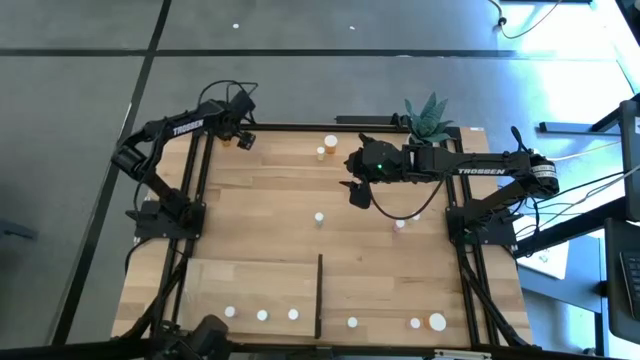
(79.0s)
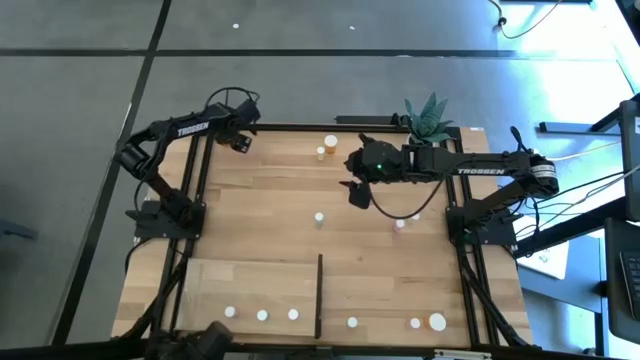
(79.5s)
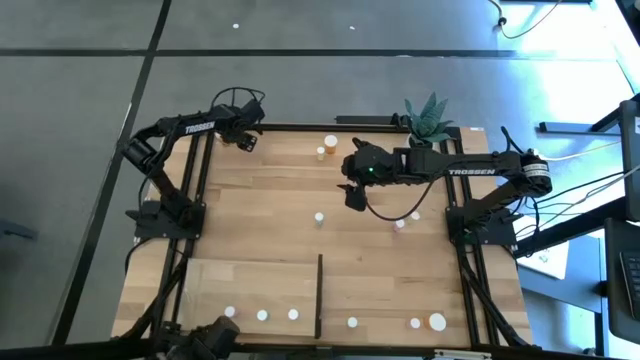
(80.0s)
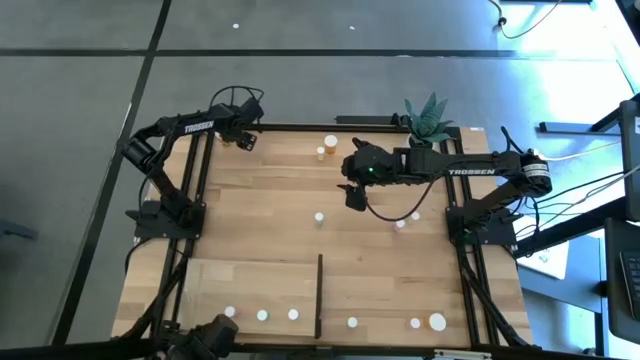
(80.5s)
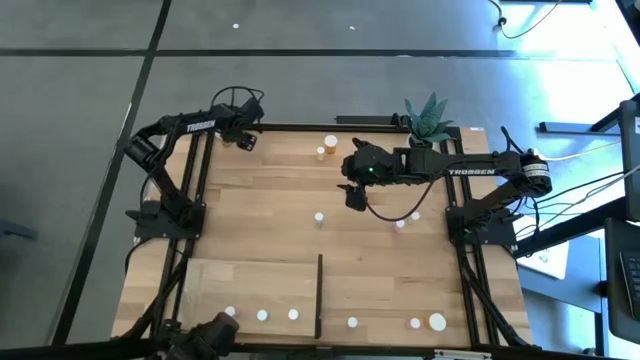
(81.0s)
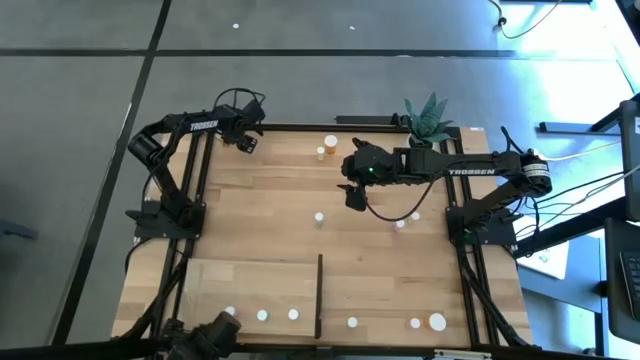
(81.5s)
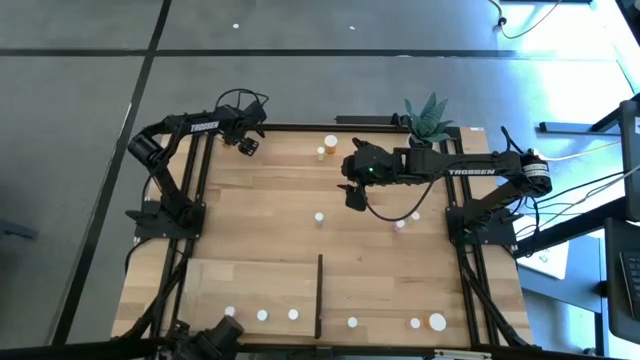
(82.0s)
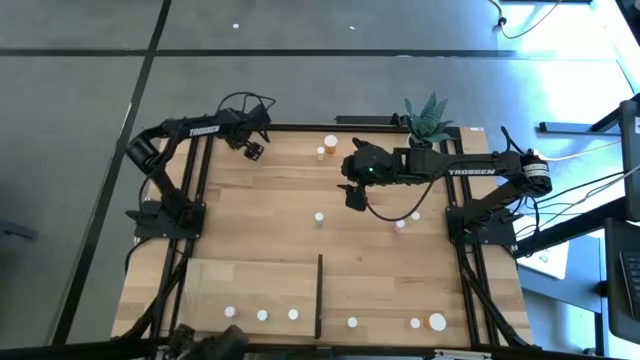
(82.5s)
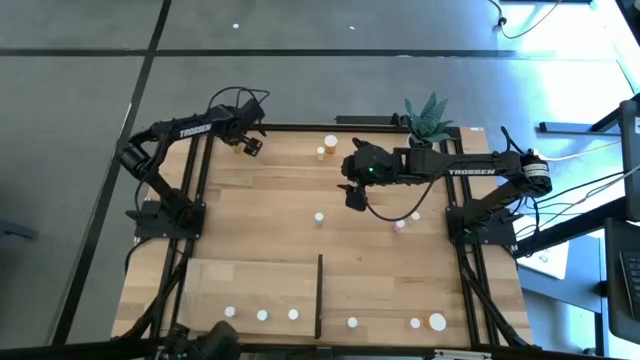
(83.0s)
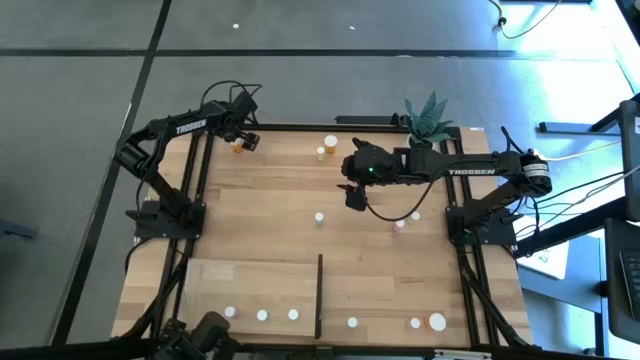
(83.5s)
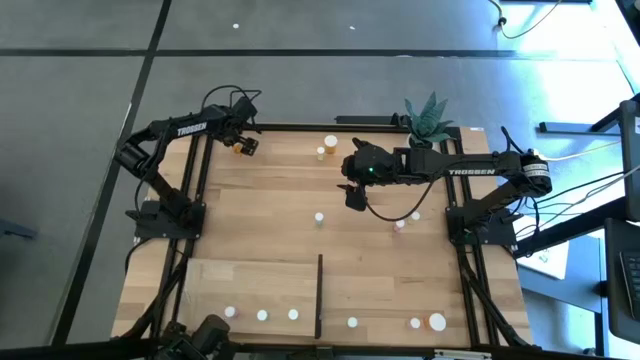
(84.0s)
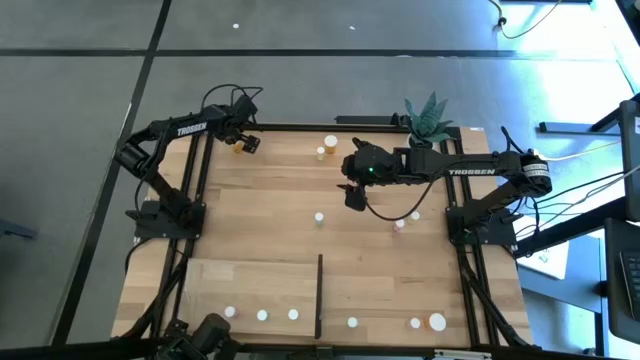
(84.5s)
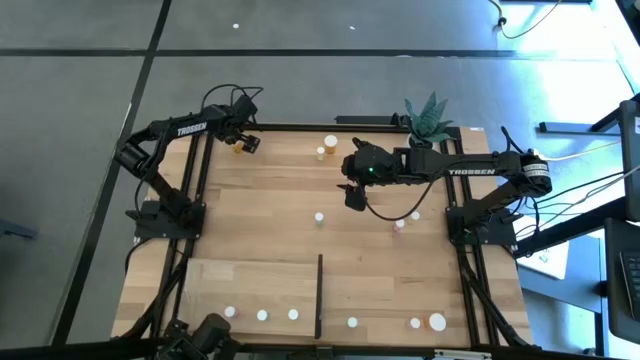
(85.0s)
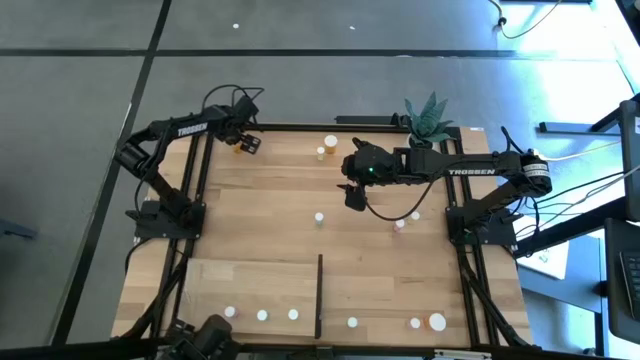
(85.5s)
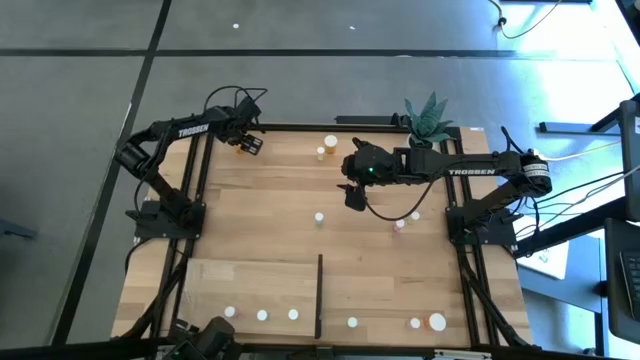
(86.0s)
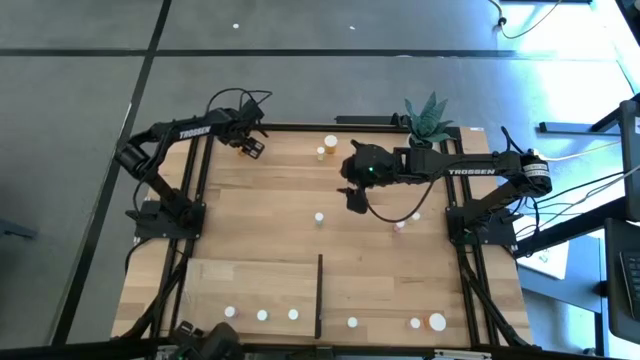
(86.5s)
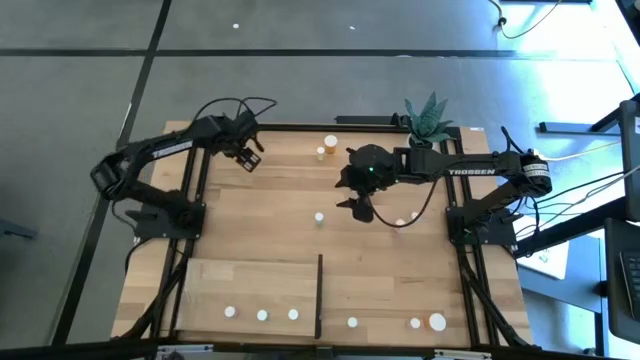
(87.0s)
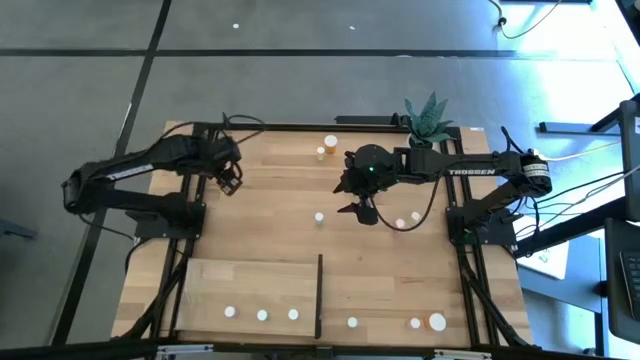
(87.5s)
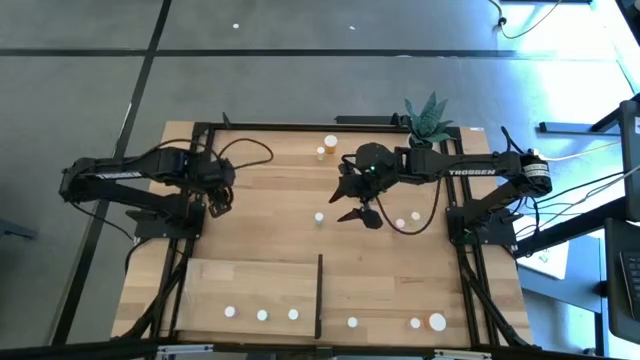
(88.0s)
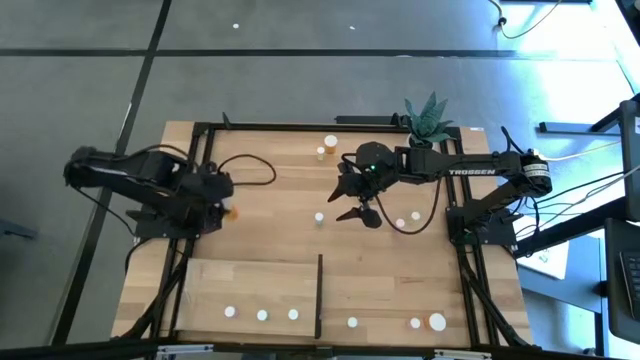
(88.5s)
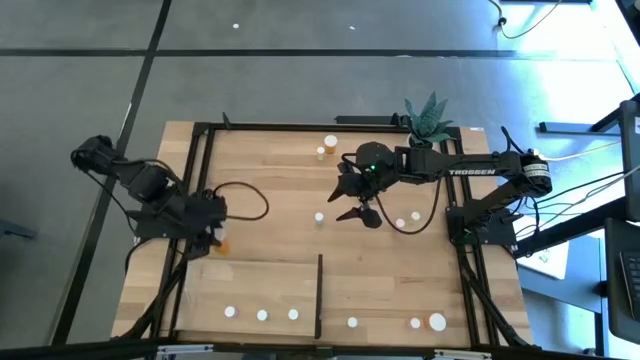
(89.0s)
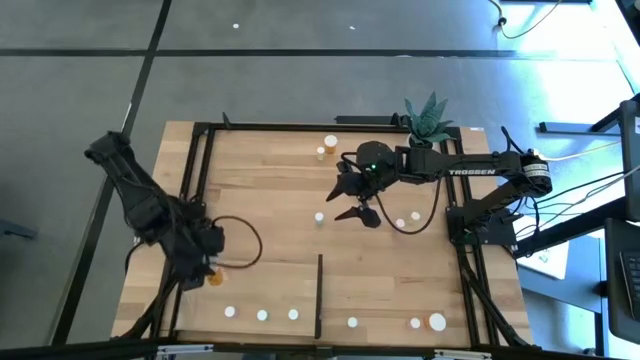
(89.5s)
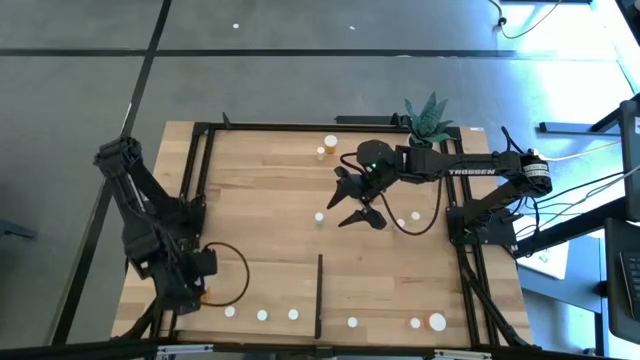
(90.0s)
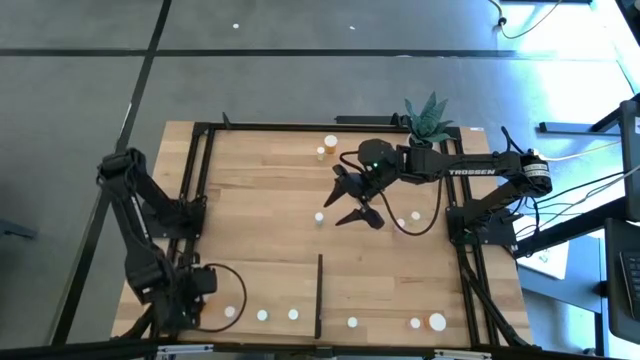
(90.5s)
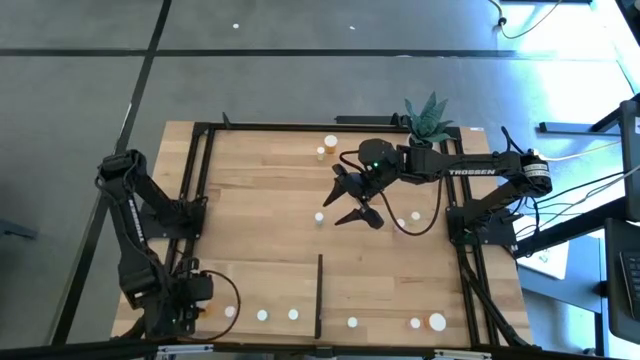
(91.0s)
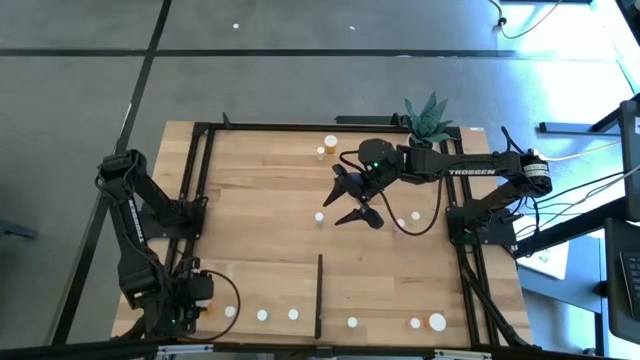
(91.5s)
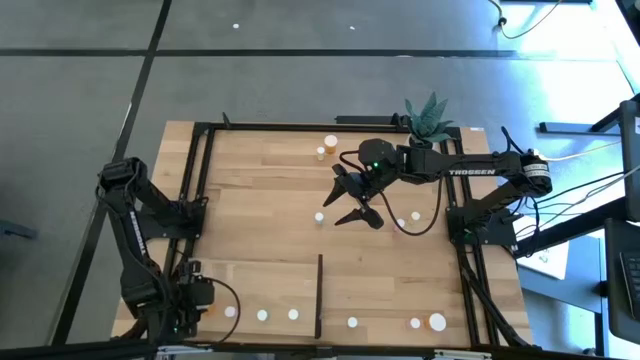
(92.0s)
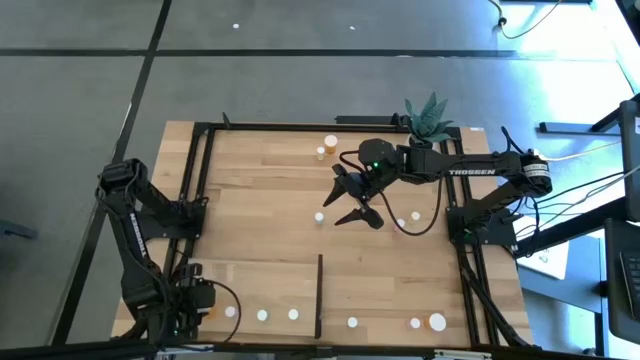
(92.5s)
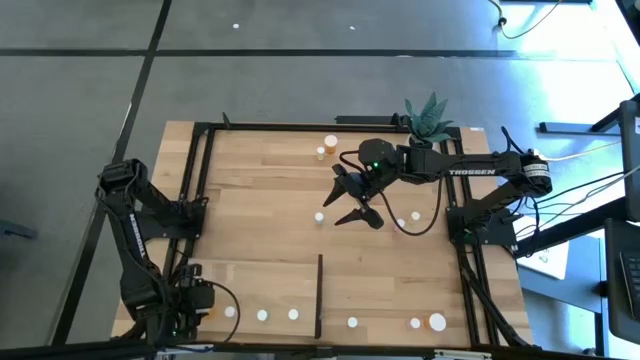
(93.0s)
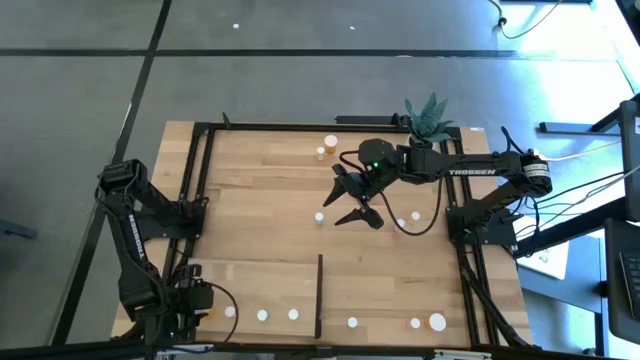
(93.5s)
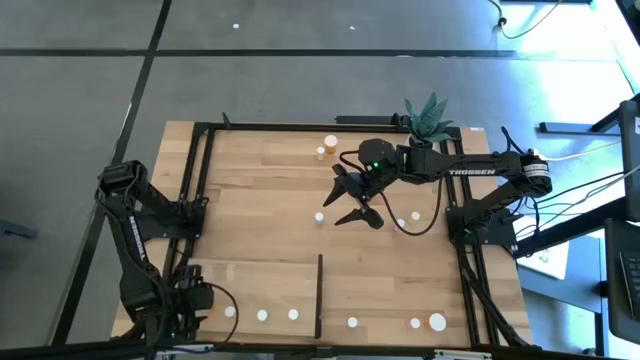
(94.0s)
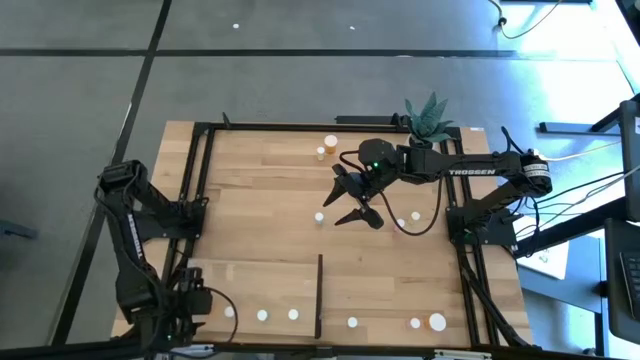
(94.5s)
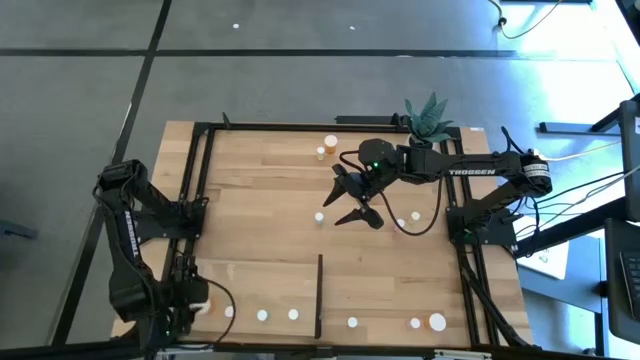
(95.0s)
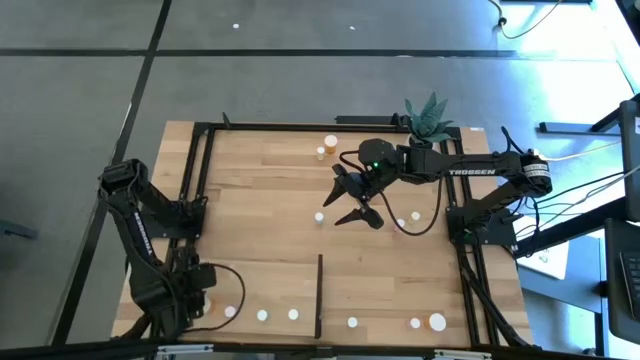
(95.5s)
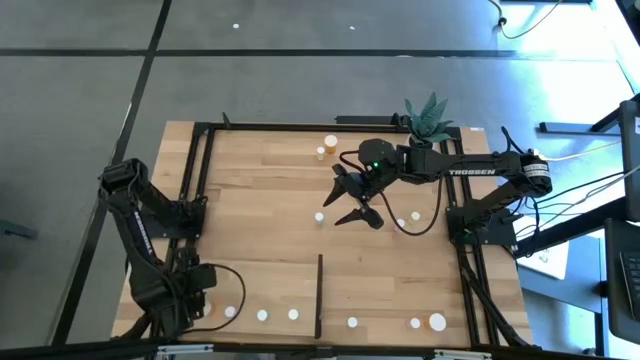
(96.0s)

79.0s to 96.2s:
Task: Pick and place medicine bottles onto shelf by color
Put the top left orange pill bottle on the shelf

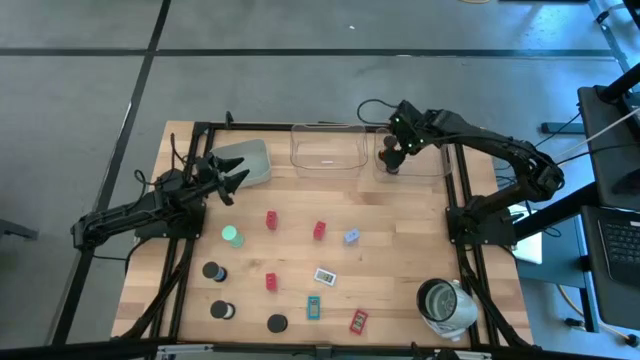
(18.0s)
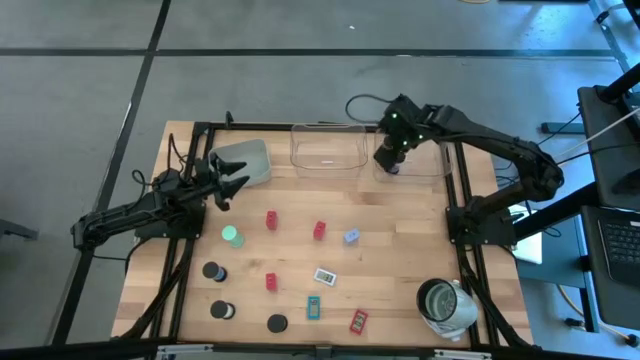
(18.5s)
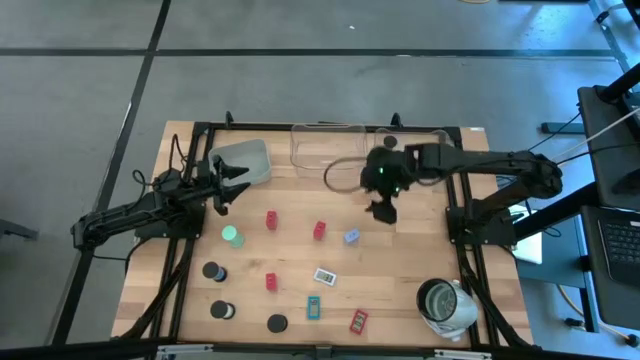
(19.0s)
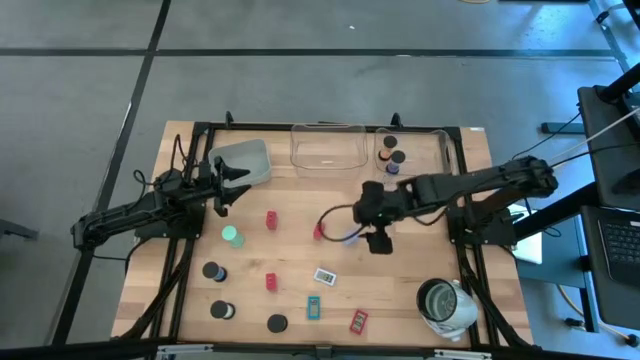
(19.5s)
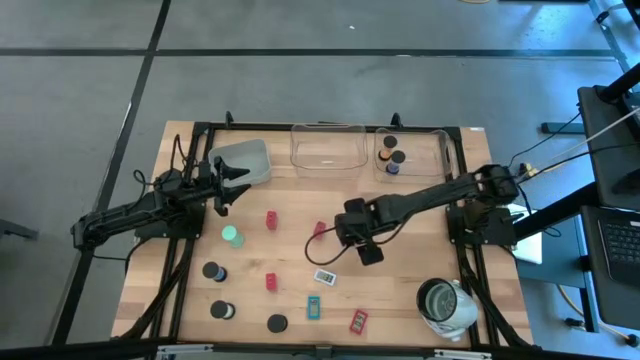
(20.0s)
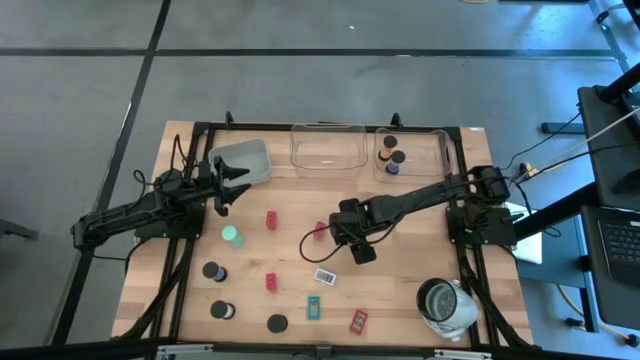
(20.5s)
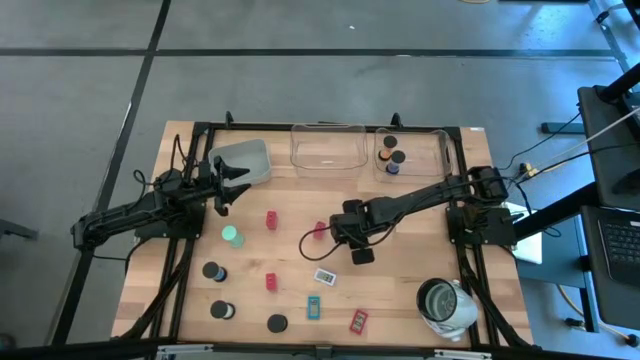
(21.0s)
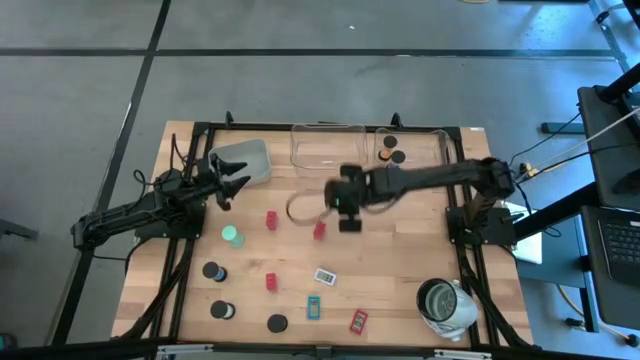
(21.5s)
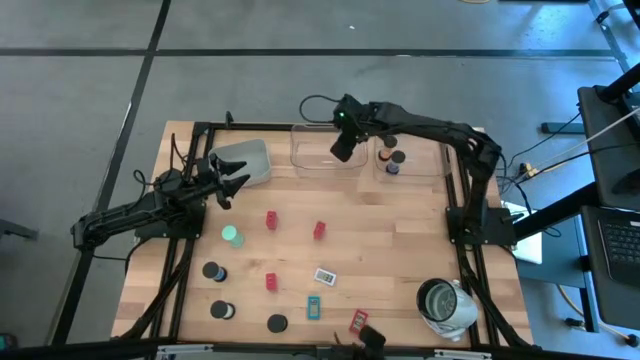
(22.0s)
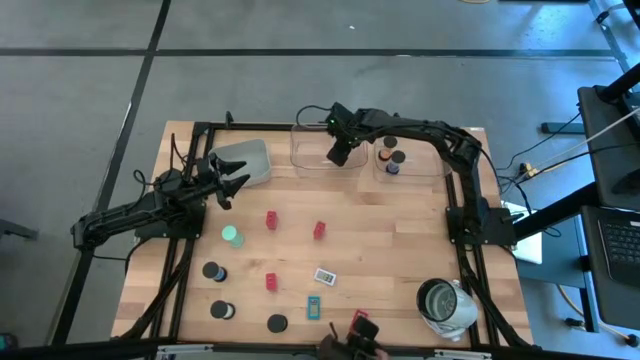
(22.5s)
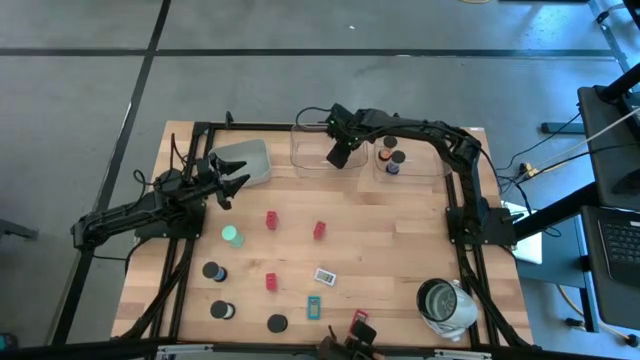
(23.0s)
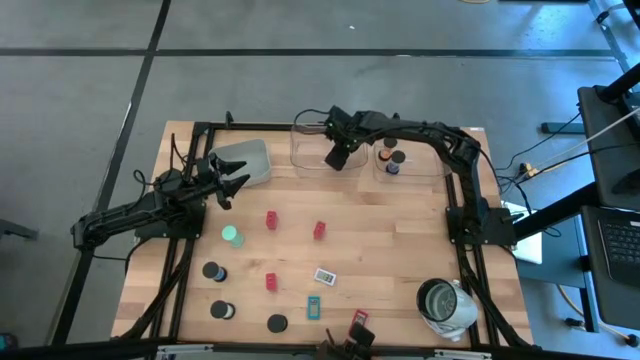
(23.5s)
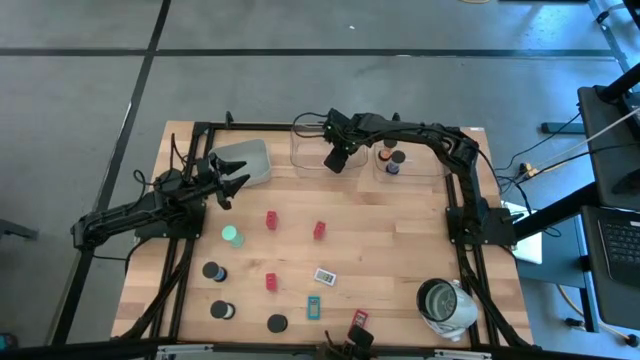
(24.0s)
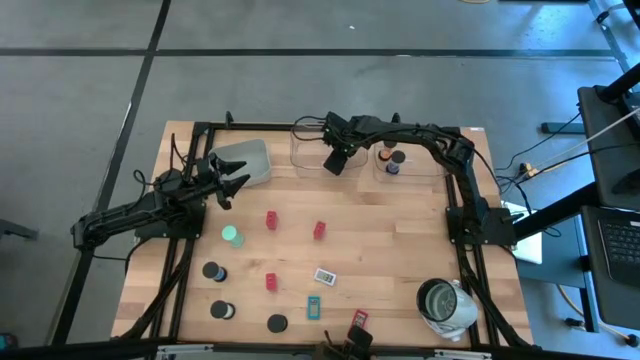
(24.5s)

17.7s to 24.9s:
Task: Pick & Place Office items
Put the violet adapter into the left transparent bin
